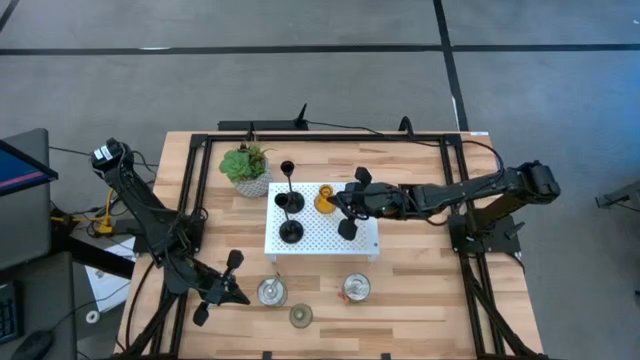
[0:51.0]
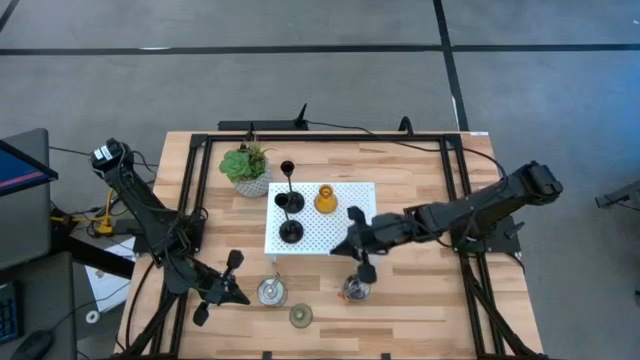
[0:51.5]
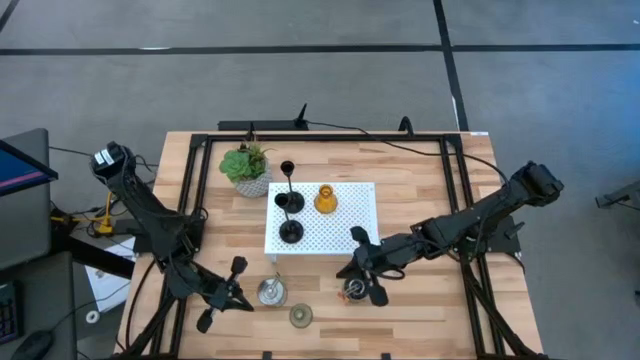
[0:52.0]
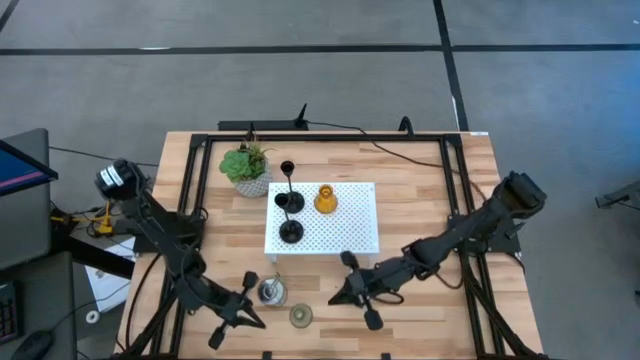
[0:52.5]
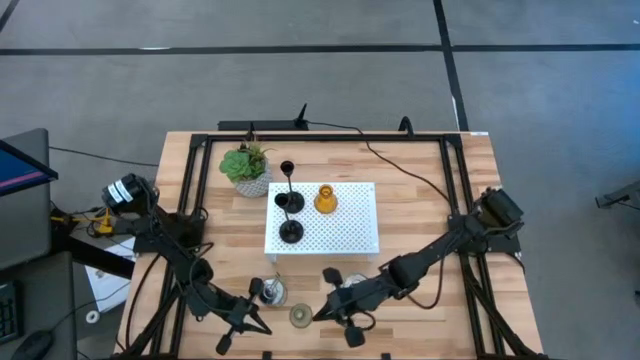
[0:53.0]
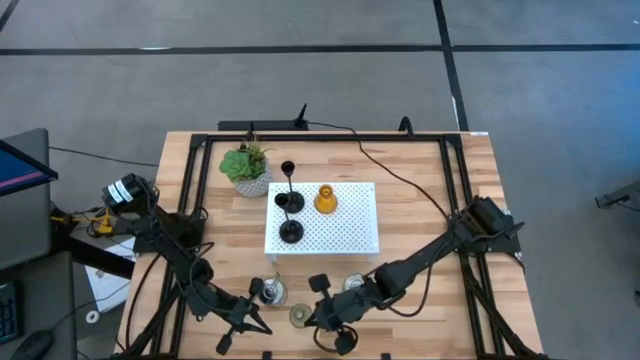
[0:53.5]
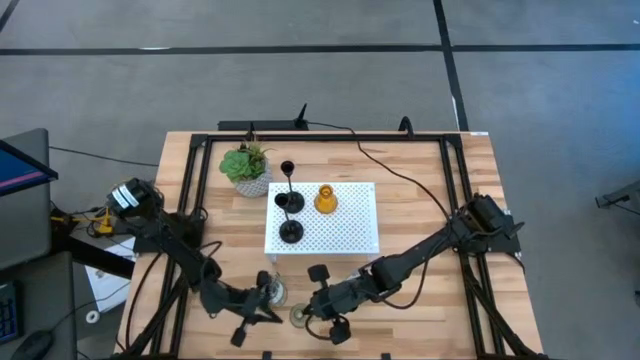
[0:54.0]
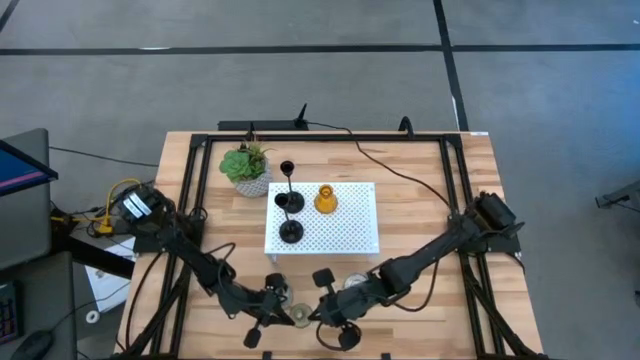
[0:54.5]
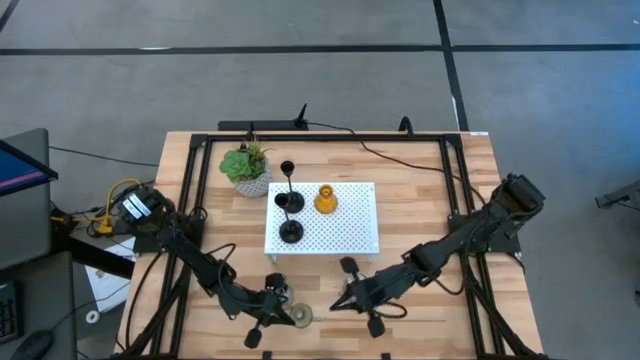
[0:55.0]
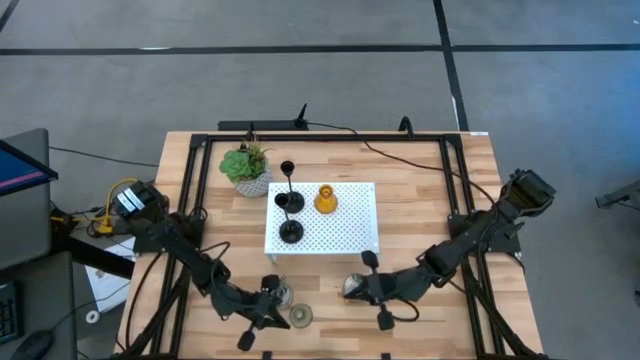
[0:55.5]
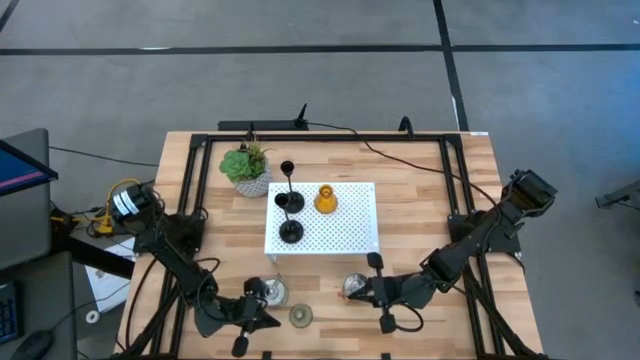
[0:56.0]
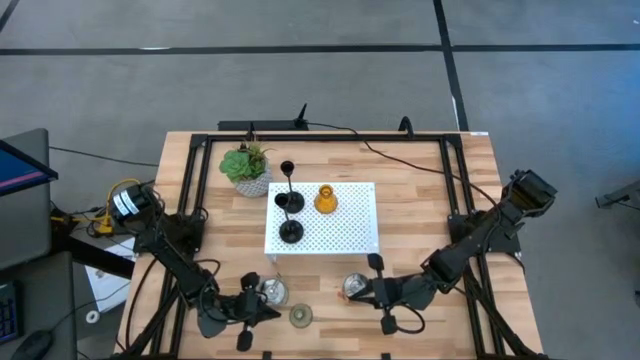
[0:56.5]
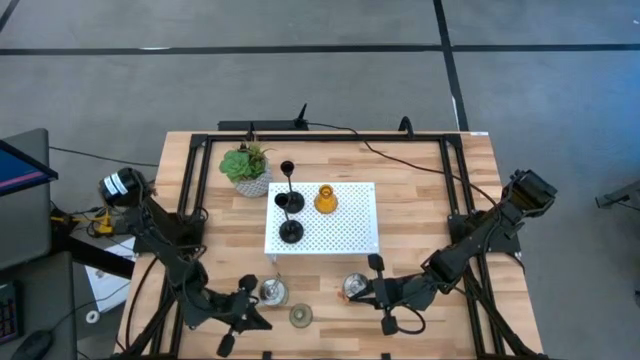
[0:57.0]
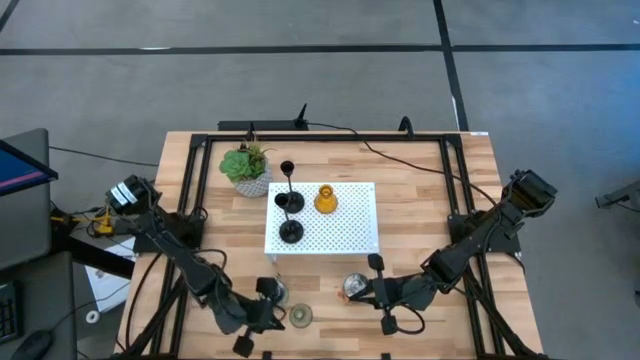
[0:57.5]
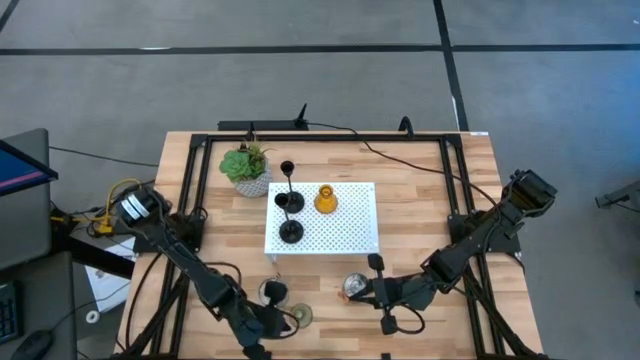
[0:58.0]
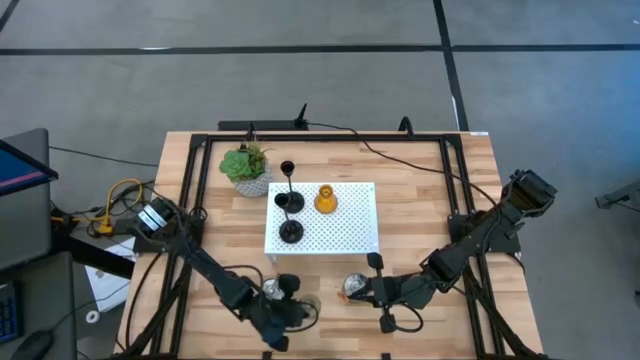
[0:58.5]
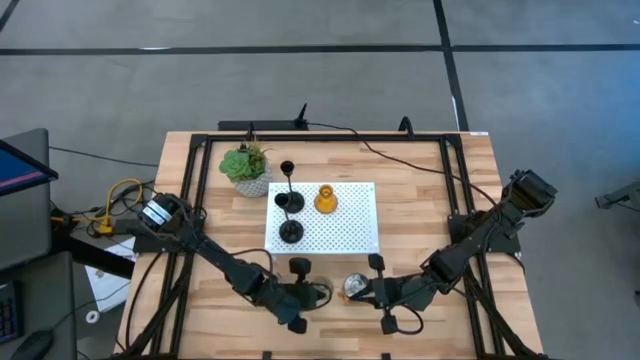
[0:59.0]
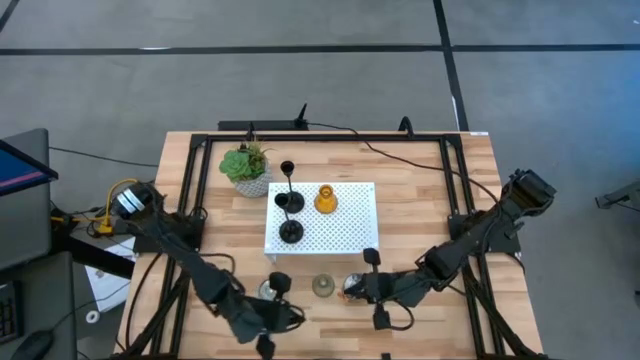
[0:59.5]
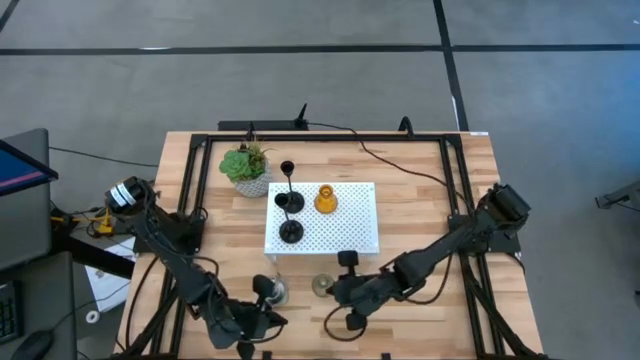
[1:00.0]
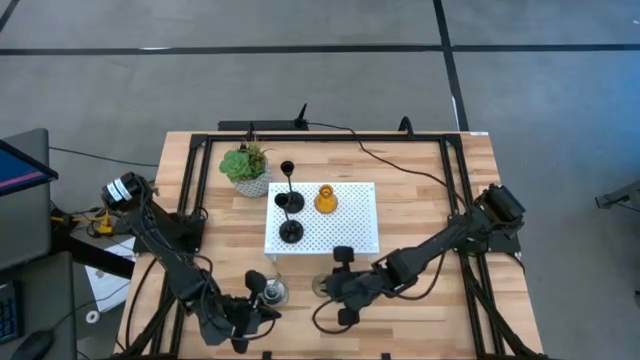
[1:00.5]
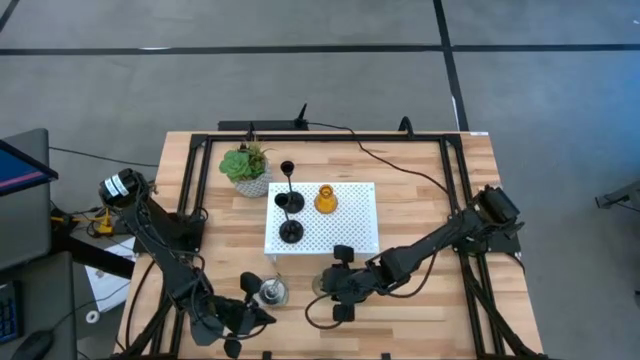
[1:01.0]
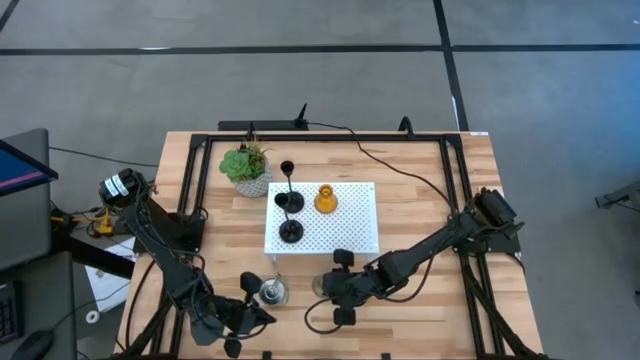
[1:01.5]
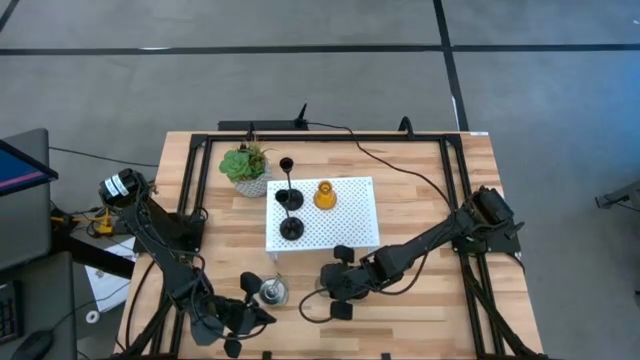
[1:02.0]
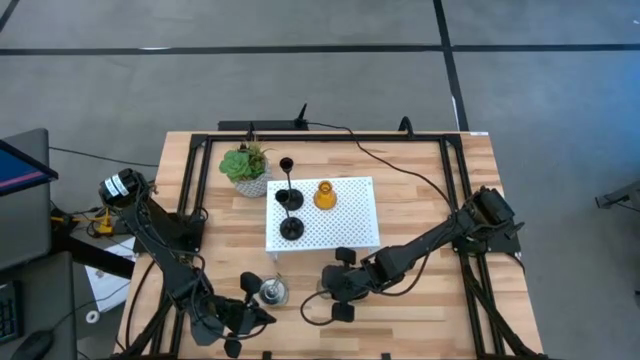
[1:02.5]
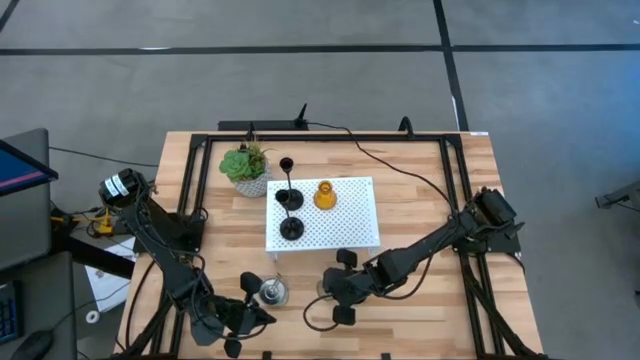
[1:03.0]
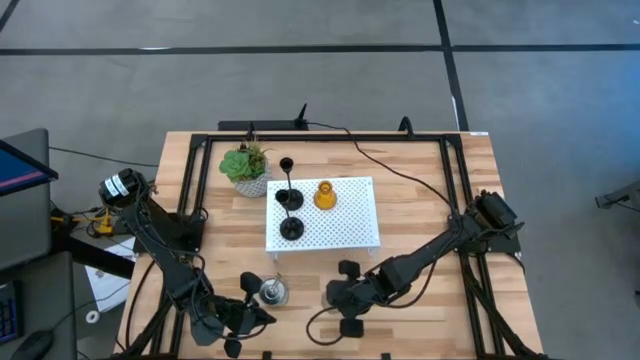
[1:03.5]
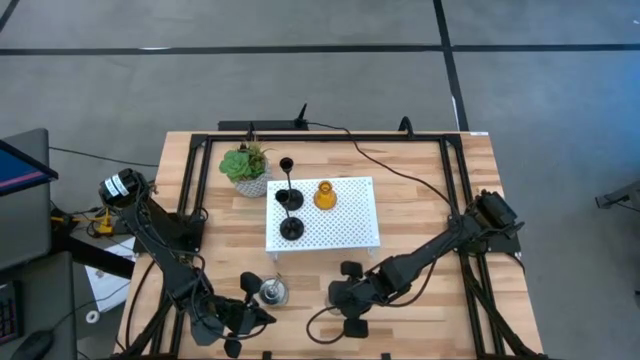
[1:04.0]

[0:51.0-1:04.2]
Task: Pick & Place candle stick holders
Align the transparent glass candle holder with the yellow glass candle holder on the shelf

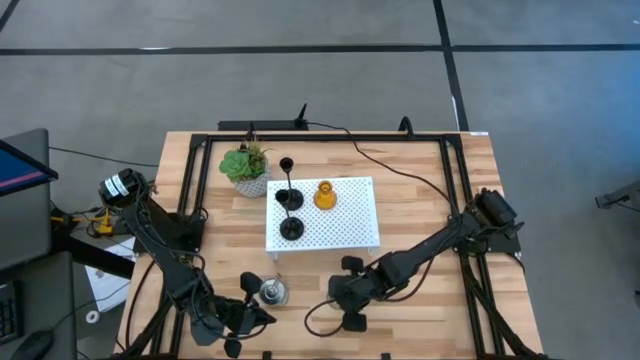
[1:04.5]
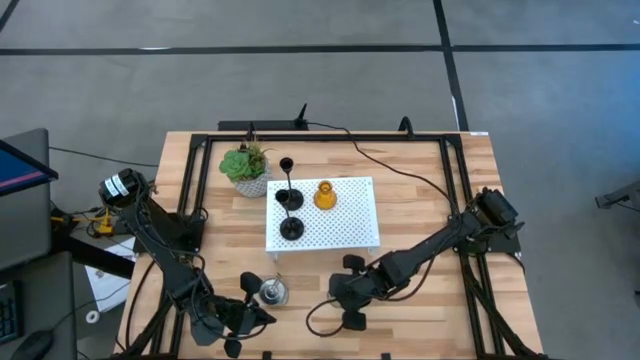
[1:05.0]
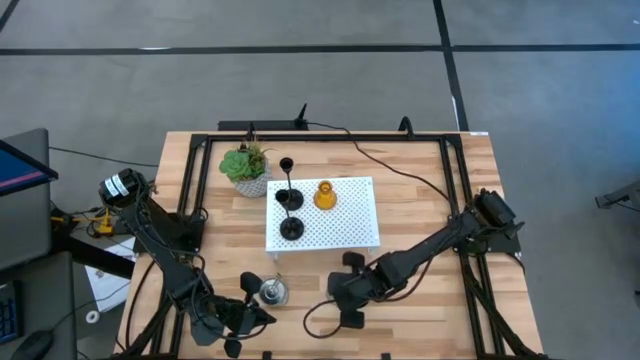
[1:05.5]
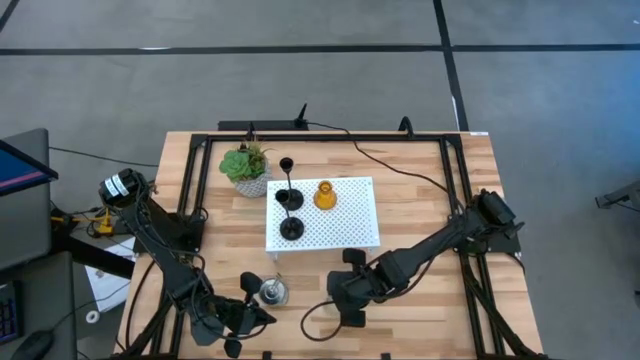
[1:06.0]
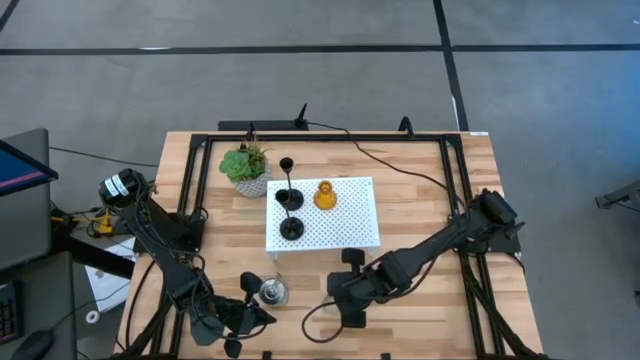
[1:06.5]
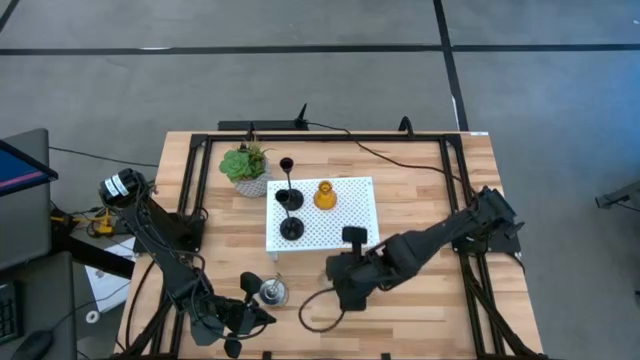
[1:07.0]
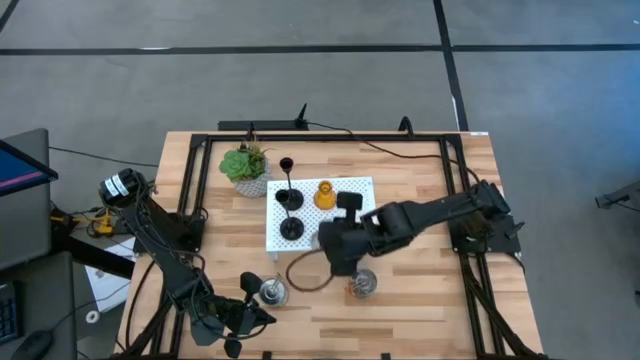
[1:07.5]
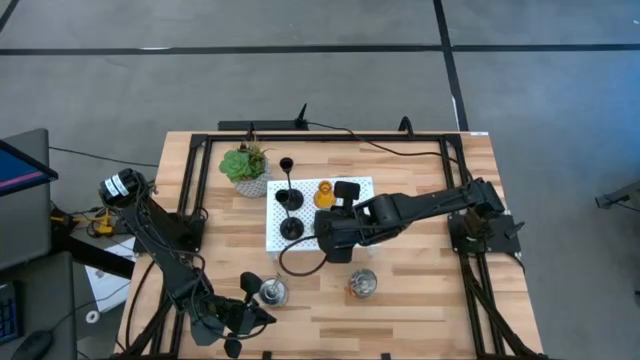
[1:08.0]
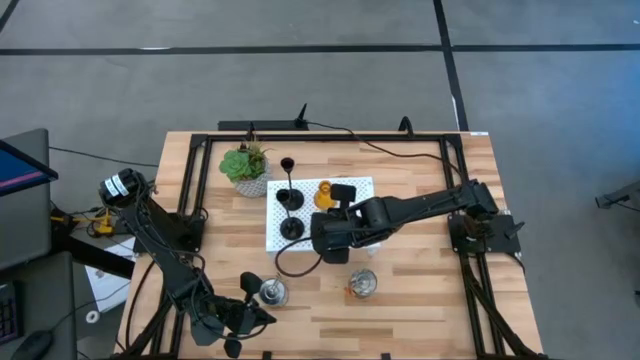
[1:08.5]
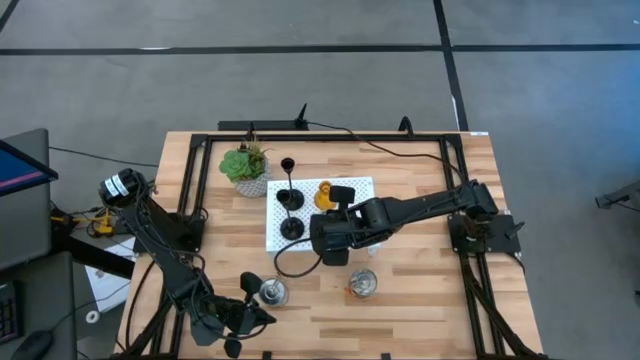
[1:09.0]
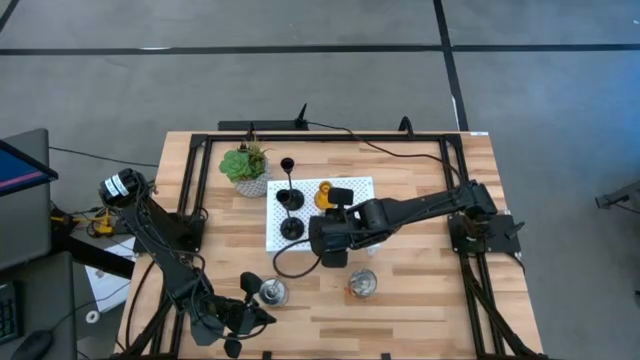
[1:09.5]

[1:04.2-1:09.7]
Align the transparent glass candle holder with the yellow glass candle holder on the shelf

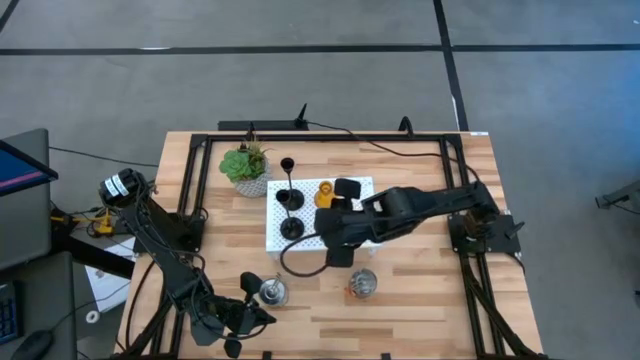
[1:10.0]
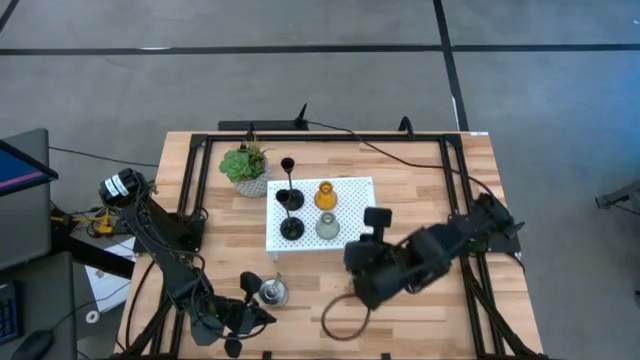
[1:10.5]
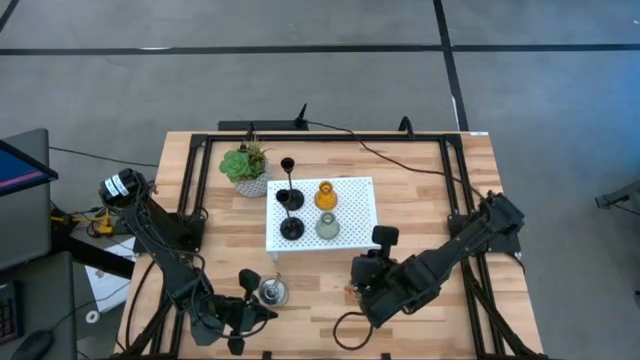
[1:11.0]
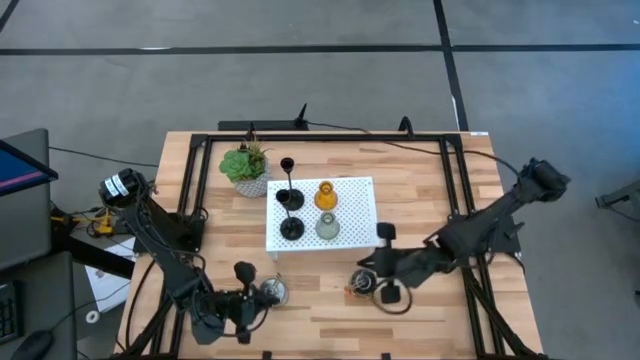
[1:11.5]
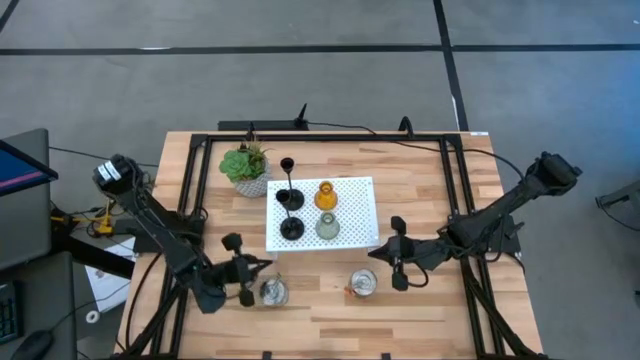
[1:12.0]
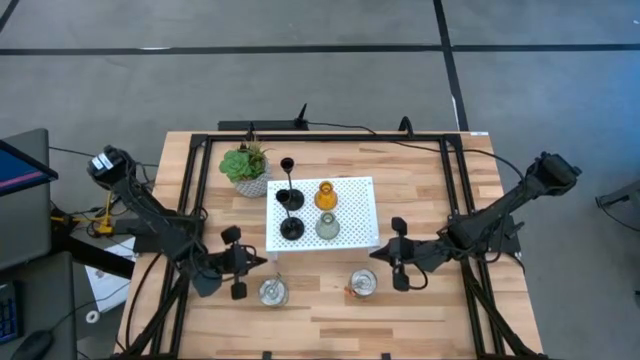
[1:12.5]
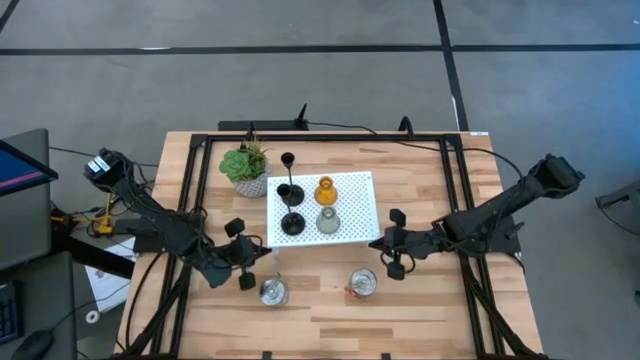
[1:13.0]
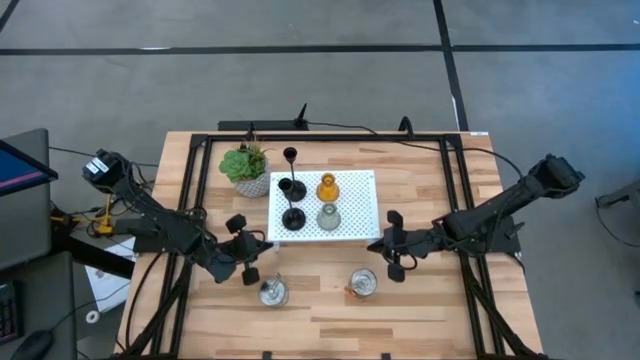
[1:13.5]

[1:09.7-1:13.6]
Adjust the white shelf
